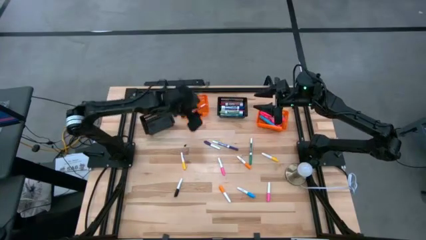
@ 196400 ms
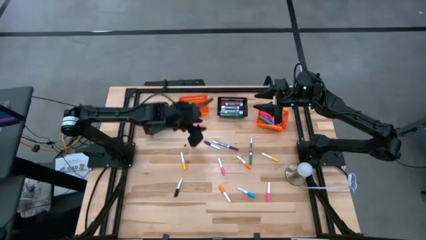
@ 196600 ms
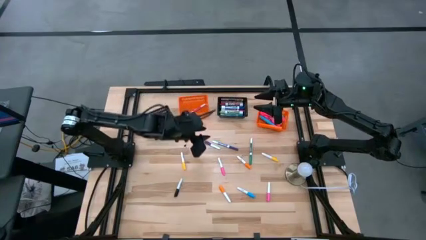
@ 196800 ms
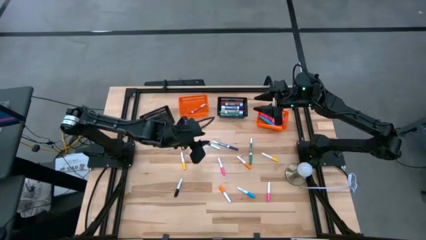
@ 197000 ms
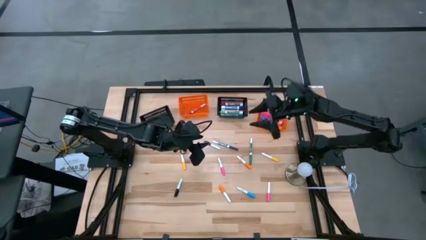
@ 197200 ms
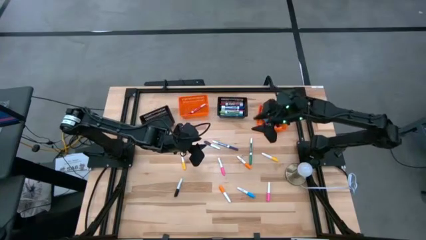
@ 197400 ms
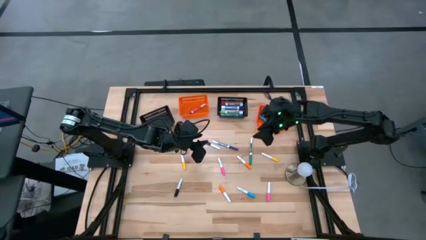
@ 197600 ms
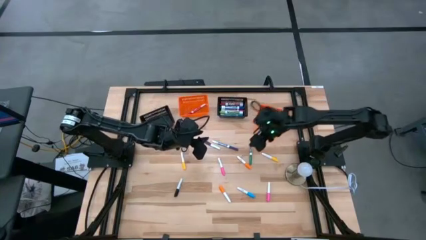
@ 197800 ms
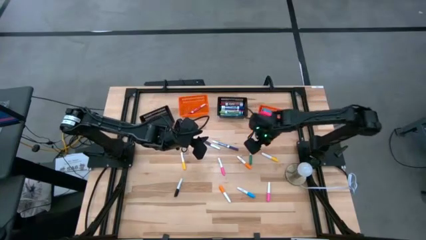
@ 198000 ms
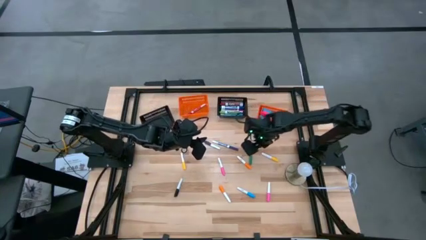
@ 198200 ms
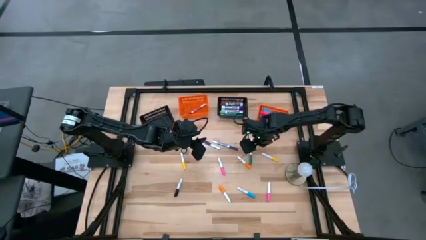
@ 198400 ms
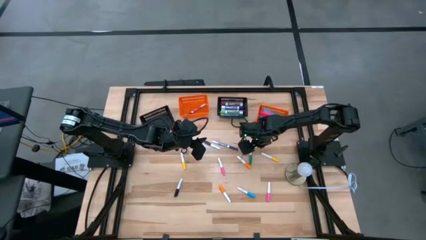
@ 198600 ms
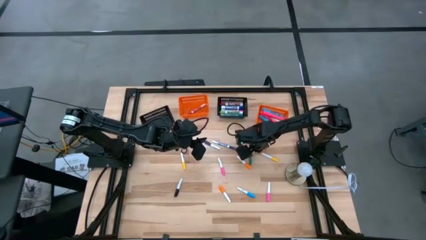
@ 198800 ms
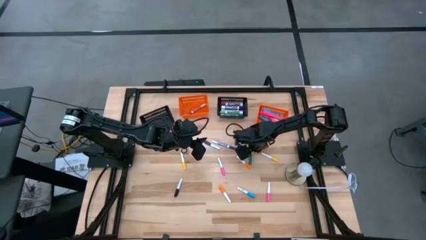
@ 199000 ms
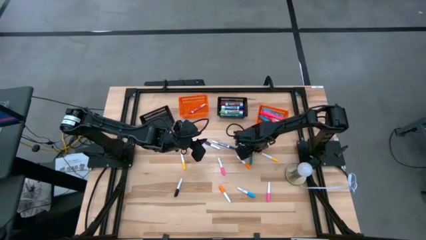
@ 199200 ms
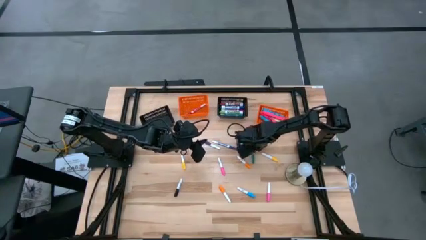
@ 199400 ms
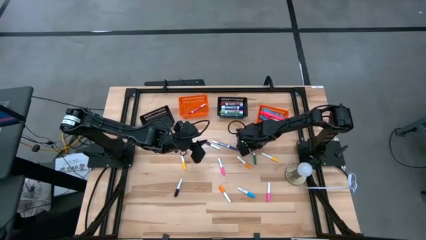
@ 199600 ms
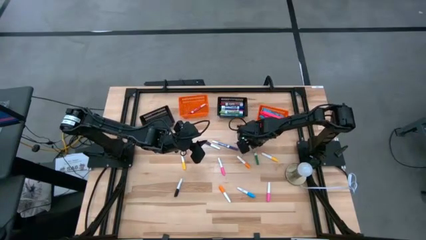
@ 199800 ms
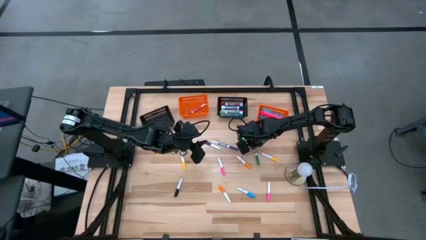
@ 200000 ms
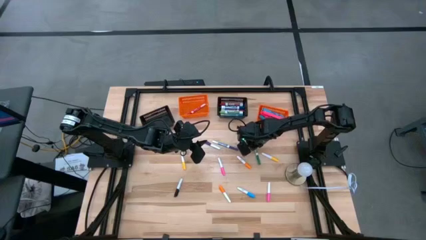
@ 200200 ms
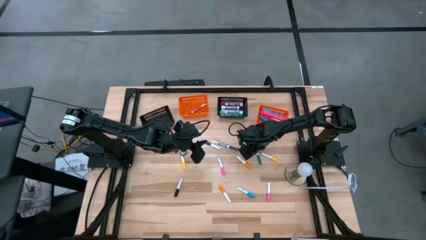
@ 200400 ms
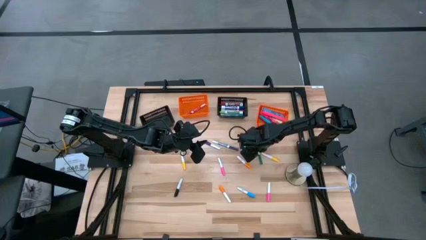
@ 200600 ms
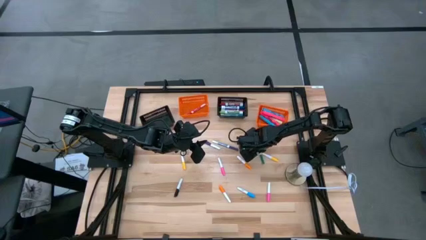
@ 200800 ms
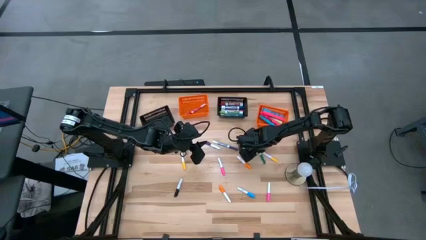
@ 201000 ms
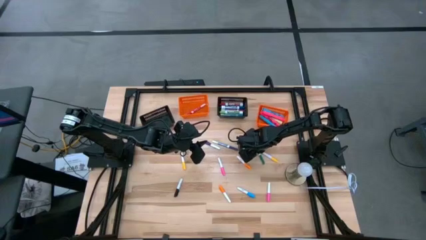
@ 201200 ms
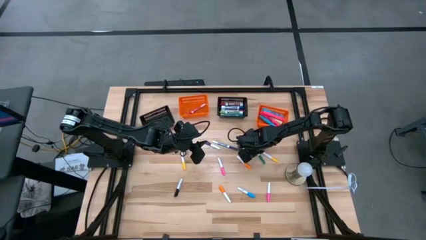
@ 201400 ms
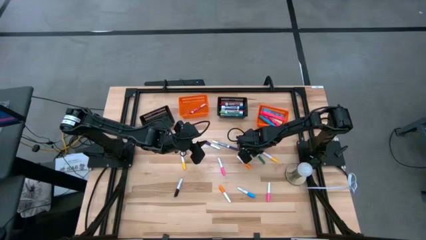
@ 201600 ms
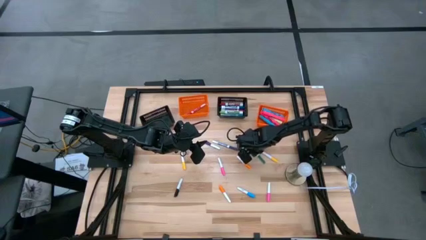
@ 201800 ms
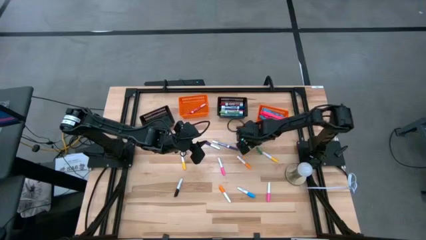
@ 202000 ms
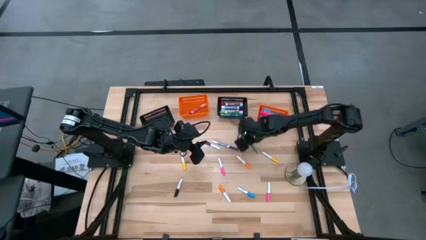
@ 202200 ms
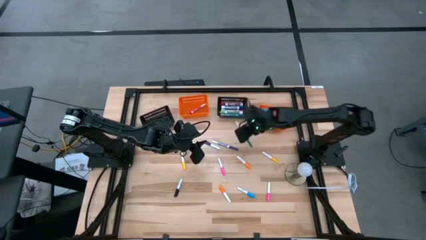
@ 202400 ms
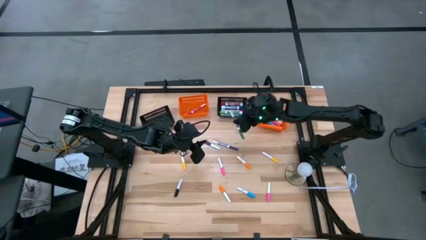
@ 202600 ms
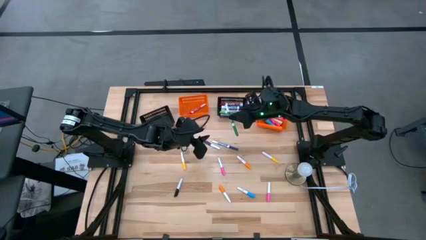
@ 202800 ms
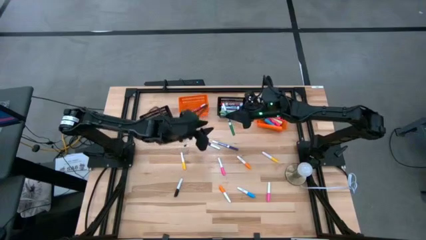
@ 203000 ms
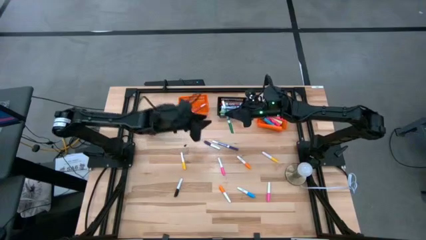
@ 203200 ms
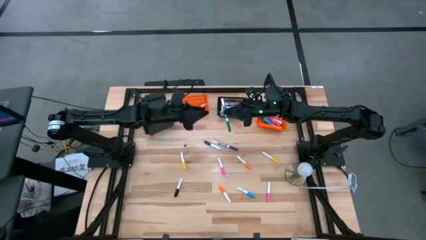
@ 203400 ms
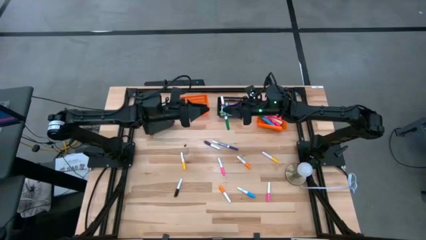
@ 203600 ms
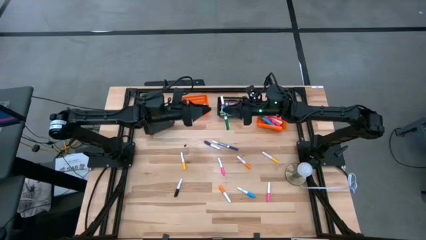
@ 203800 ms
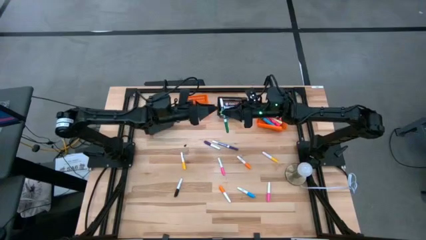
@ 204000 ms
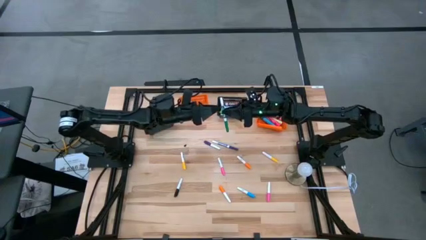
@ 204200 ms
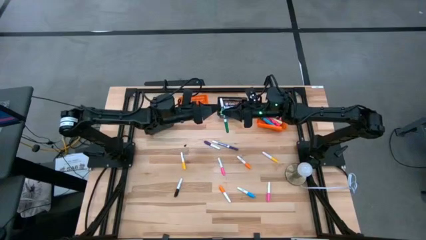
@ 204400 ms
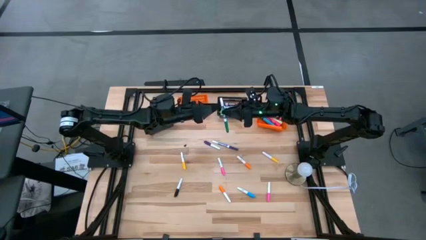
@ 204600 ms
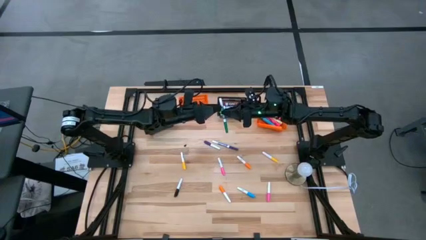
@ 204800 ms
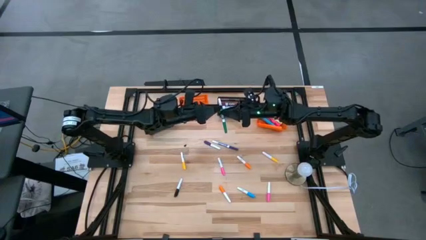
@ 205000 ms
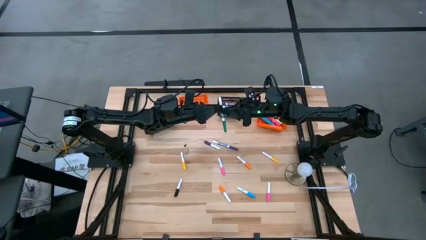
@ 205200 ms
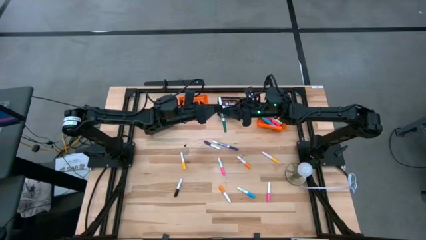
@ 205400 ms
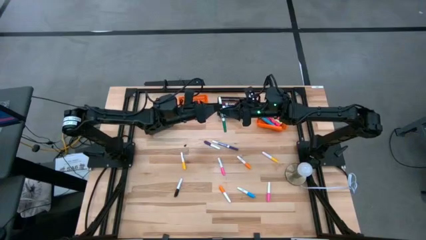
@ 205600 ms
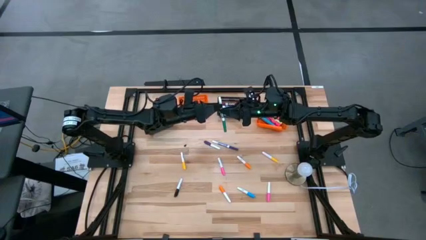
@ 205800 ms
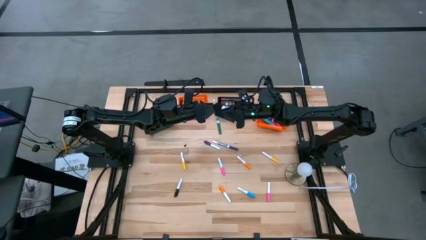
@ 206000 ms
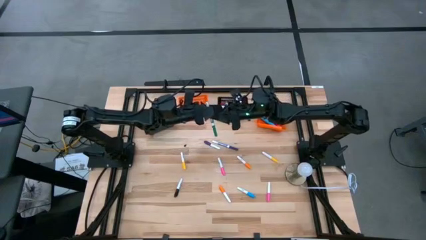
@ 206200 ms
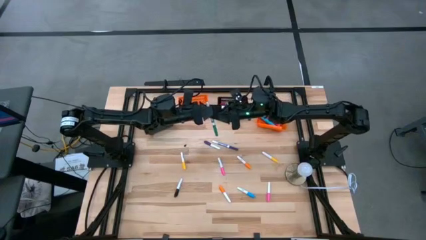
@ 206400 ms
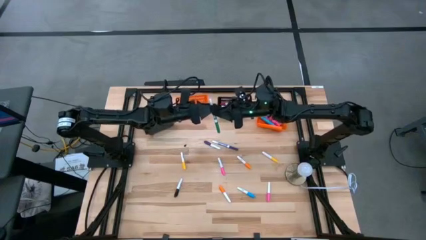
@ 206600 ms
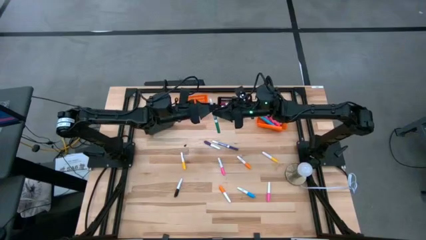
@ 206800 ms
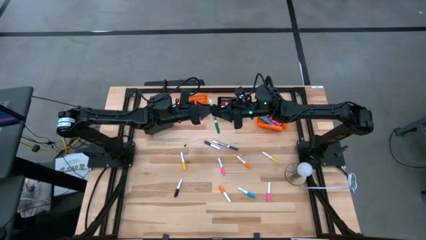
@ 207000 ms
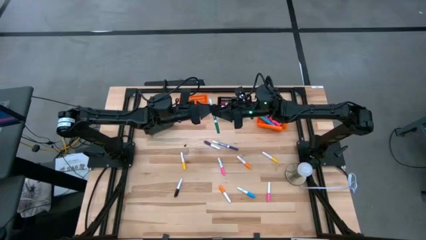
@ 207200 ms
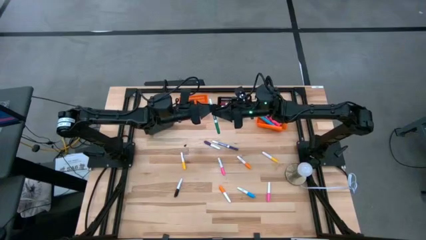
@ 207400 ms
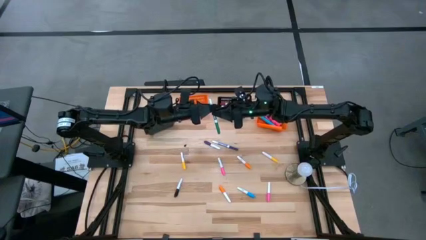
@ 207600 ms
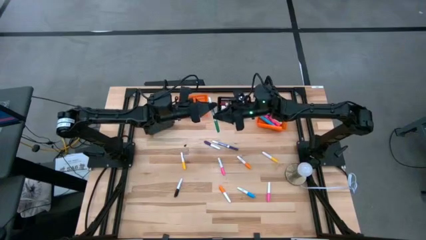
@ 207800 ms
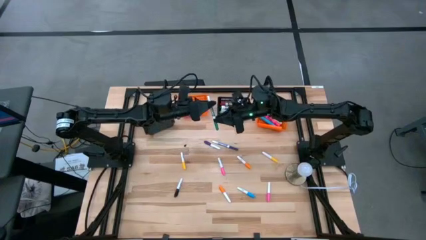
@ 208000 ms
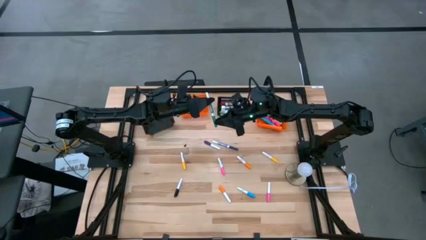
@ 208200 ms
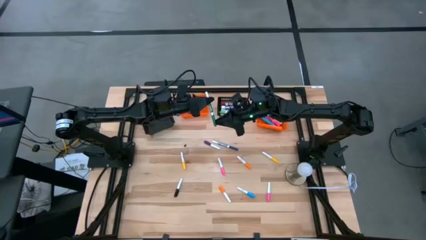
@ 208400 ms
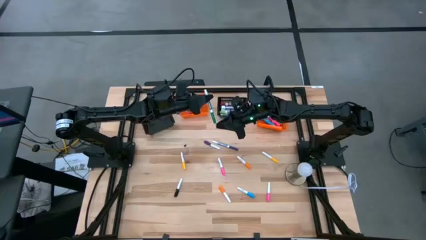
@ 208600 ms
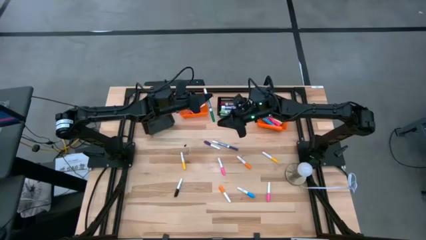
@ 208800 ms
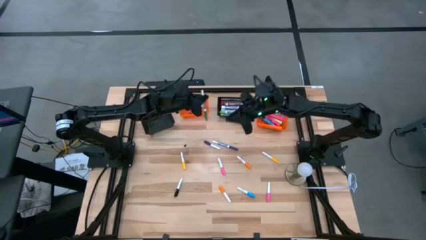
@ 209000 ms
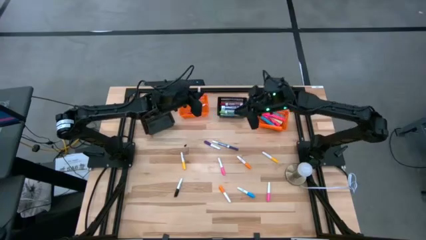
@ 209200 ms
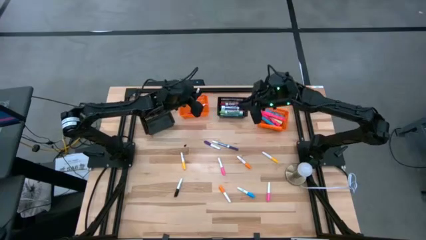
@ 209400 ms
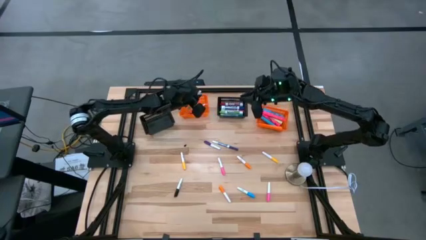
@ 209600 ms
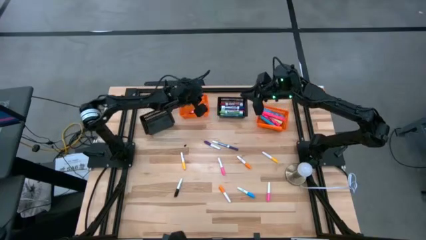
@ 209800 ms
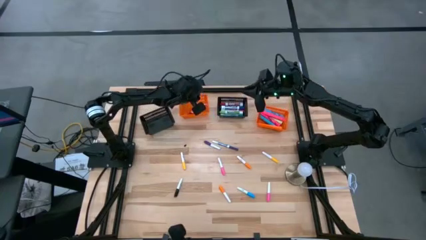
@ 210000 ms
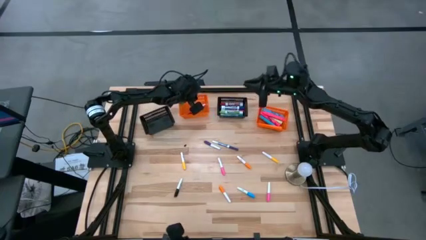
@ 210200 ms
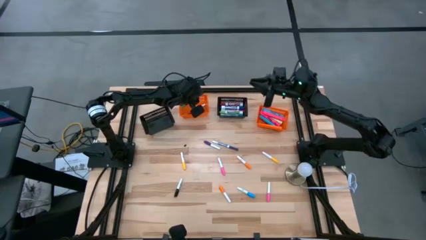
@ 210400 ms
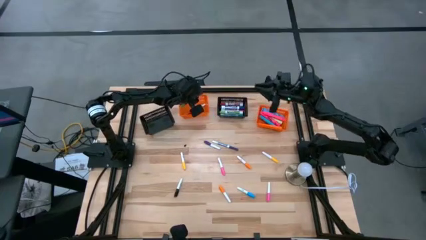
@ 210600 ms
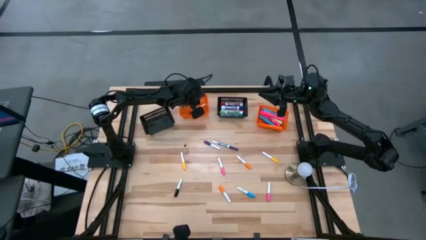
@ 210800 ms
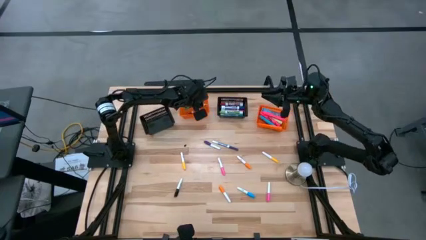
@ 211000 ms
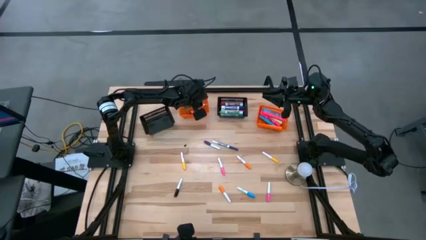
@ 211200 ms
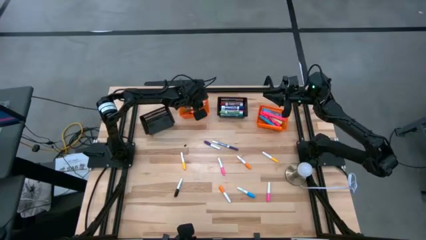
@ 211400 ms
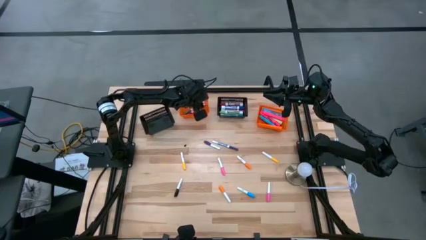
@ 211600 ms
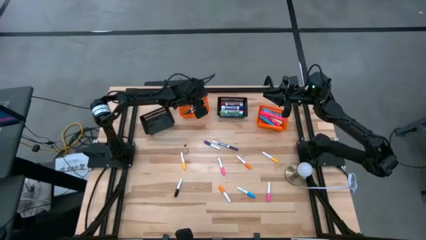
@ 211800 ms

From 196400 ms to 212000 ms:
Task: Pick & Place Markers
Put the green marker into the left orange bin

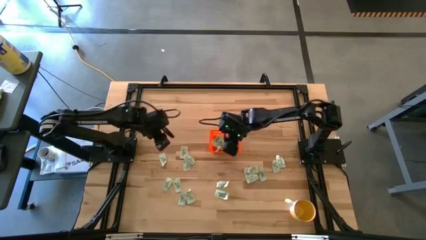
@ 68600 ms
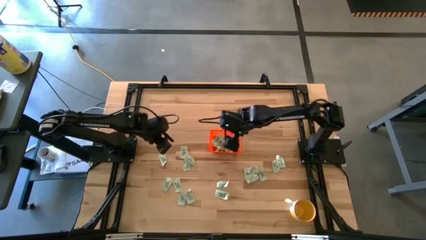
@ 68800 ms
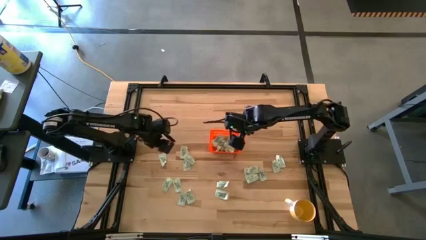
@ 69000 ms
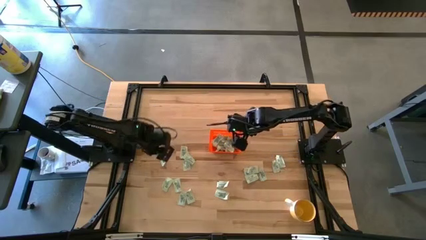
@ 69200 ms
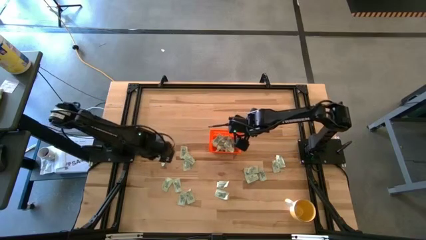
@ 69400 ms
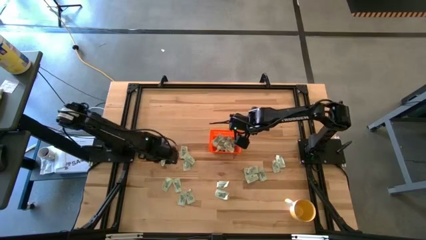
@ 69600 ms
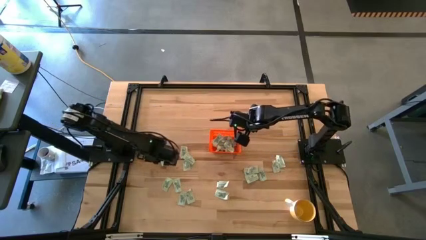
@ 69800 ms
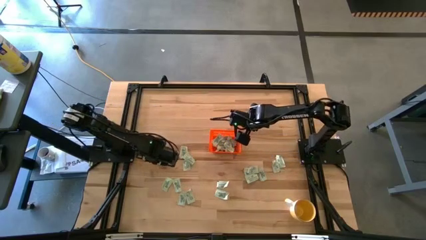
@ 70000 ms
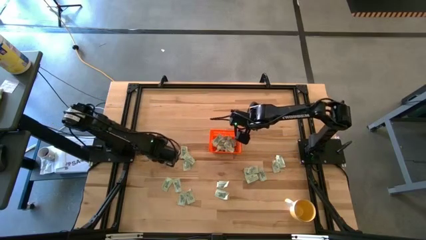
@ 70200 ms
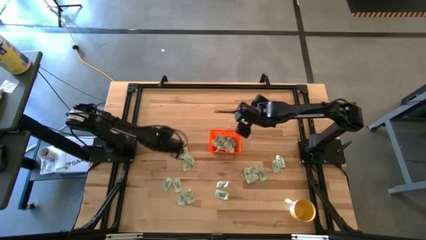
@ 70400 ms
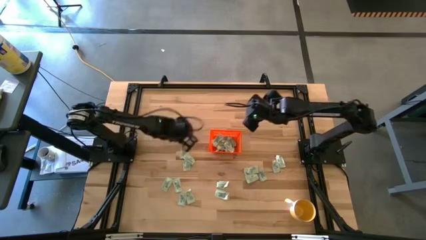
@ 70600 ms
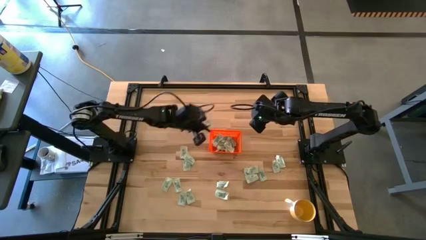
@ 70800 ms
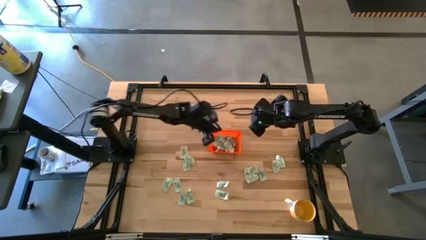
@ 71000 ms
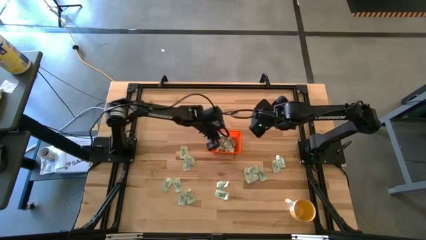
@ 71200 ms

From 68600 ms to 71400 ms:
Task: Pick and place Stevia / Truvia into bins
Put the light green stevia packet into the orange basket
